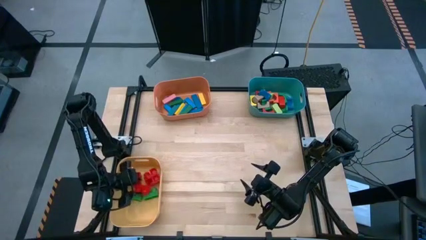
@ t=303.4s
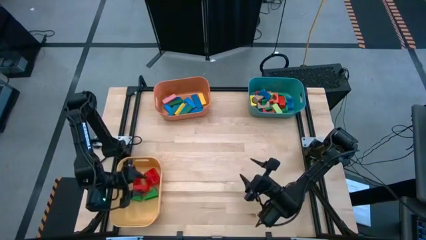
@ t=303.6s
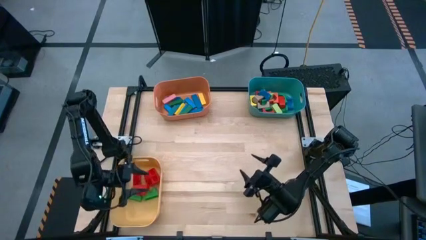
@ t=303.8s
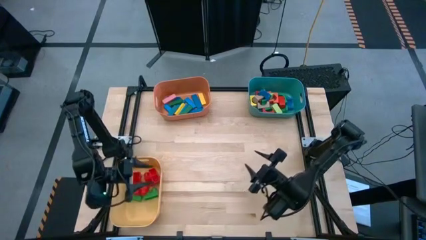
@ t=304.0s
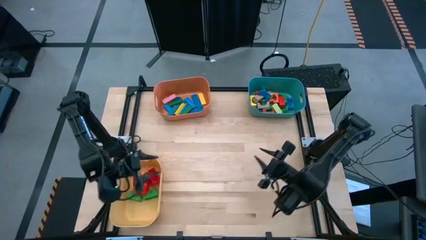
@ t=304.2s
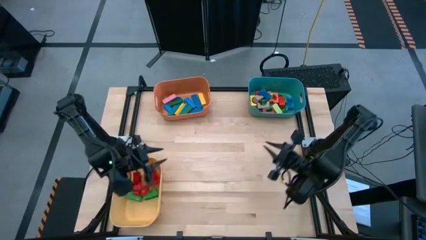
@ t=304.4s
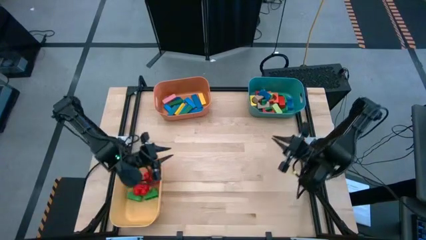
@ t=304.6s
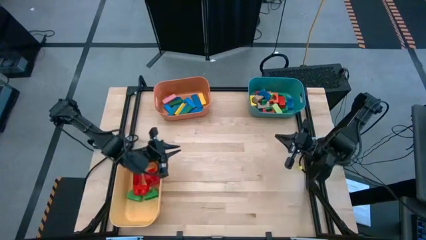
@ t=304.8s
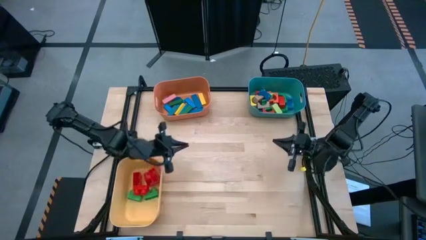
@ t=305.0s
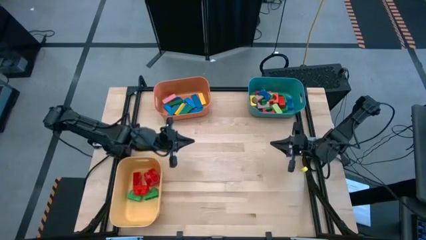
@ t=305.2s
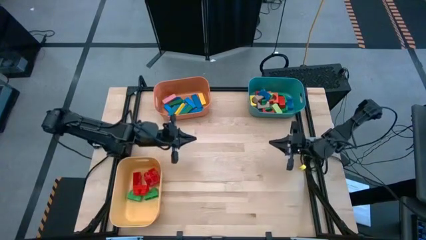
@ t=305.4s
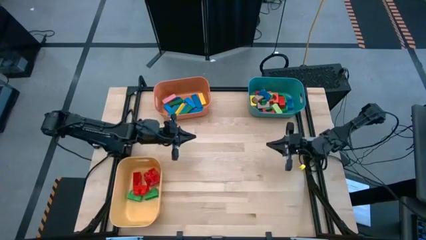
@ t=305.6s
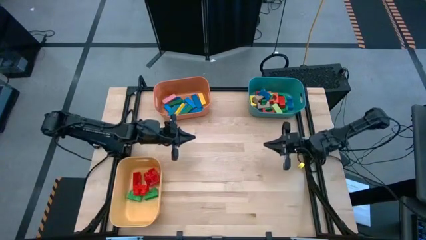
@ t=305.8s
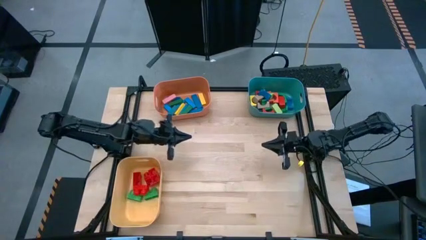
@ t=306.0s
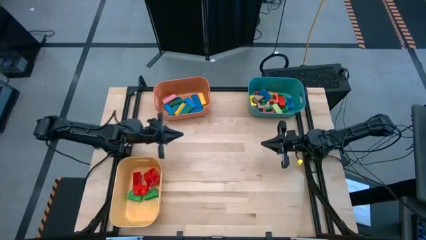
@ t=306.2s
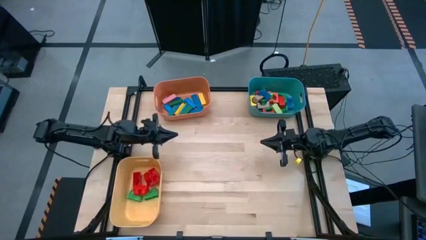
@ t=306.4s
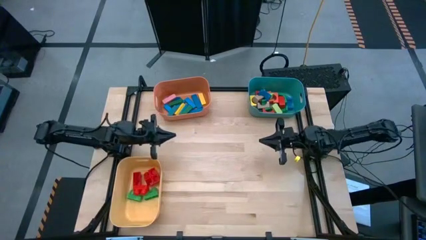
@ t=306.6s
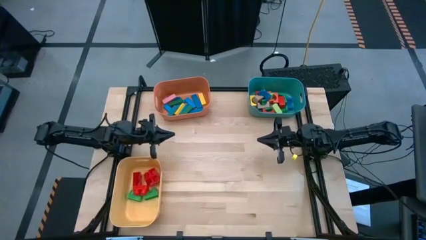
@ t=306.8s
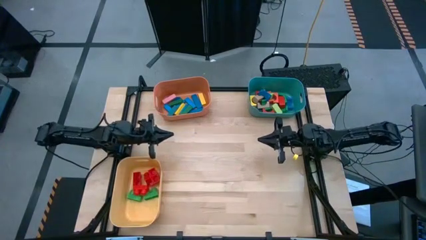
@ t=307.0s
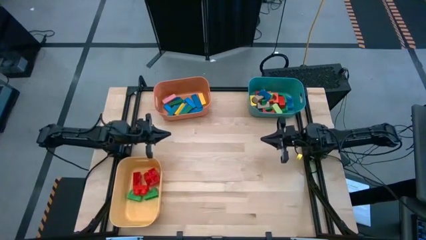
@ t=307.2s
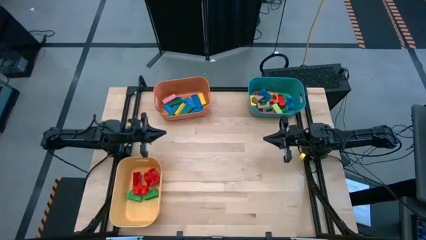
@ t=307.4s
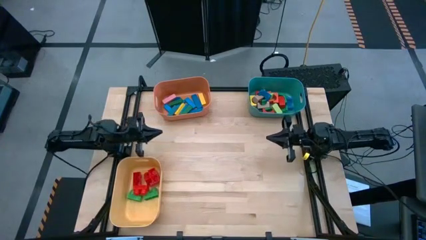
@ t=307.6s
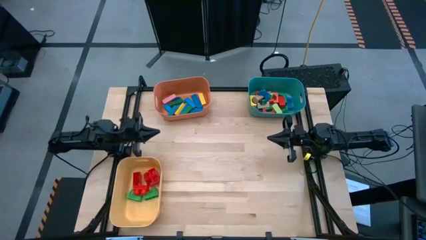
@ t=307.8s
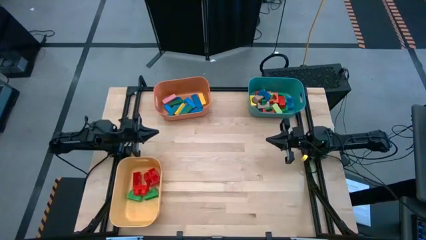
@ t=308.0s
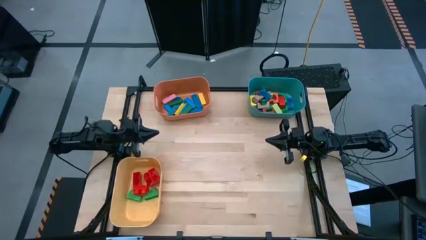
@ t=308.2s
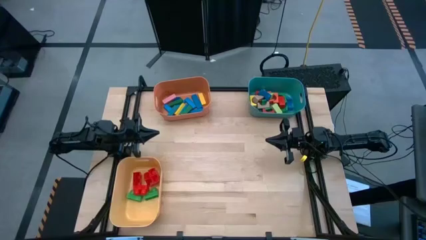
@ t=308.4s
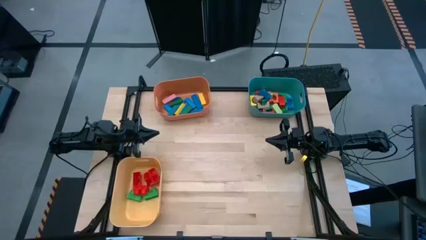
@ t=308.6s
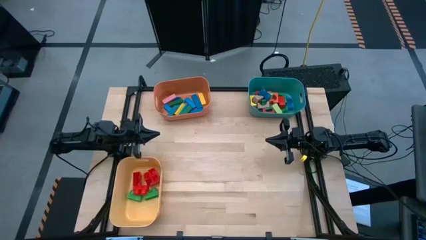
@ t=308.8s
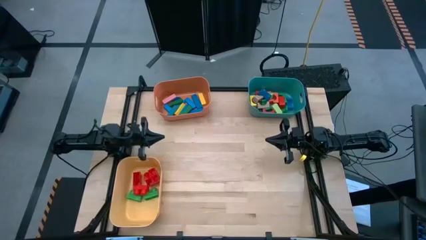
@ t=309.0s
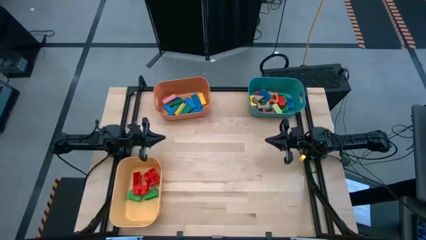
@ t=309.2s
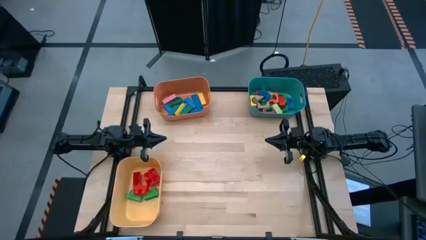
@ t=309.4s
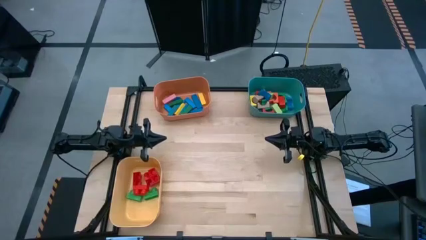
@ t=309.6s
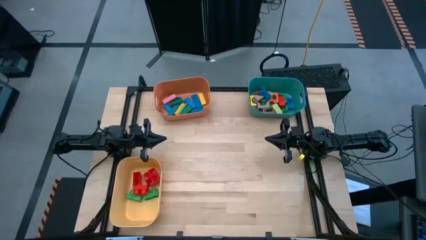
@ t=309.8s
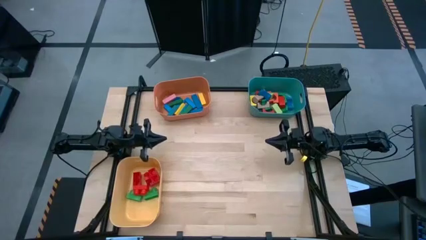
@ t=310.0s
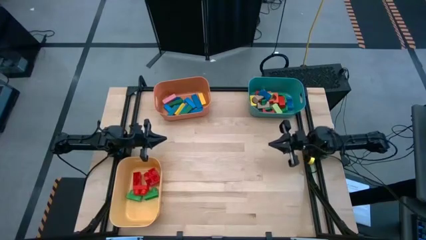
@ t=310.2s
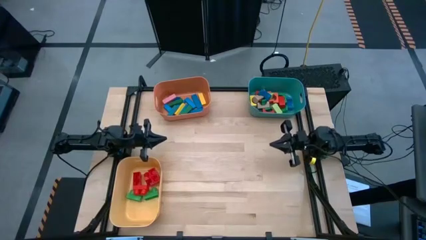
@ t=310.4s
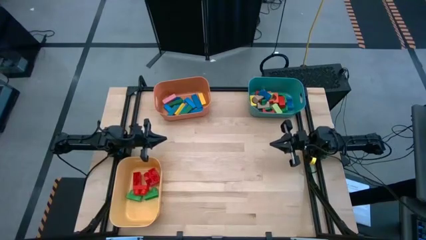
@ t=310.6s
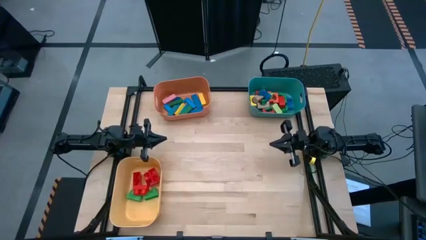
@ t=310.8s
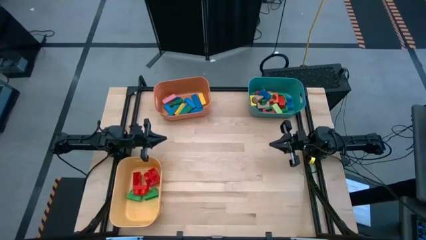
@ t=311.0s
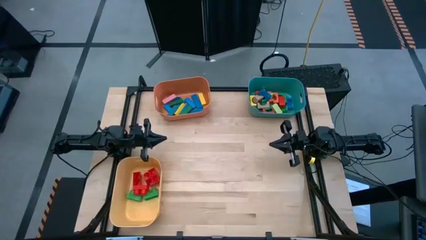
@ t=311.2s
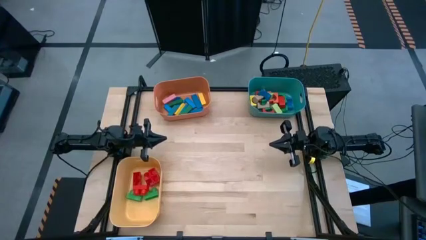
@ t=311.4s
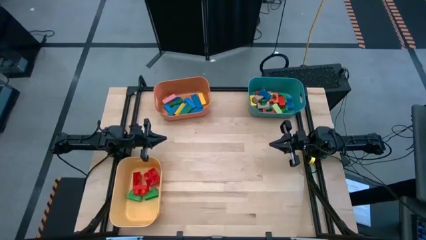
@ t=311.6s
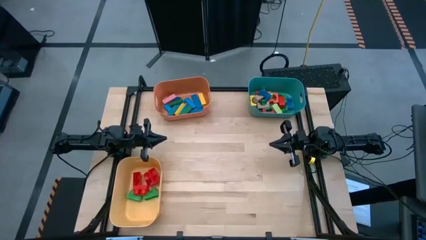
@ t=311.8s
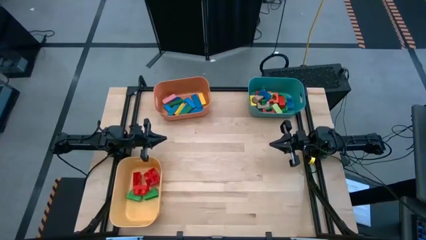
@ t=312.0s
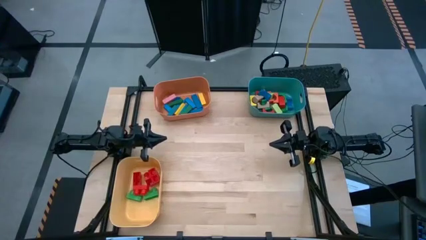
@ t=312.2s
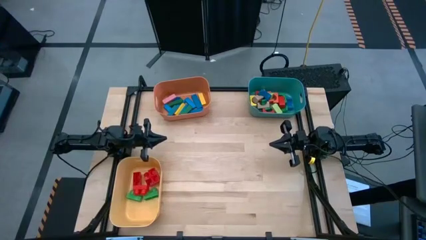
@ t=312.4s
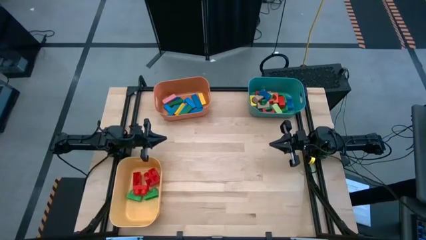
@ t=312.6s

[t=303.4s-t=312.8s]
Task: Sort blocks by size
Return to Home Position

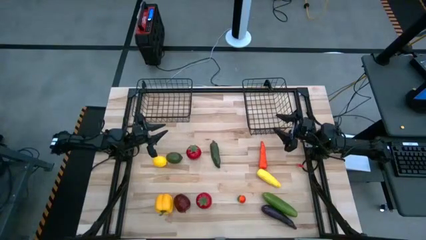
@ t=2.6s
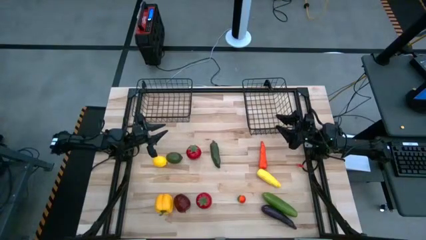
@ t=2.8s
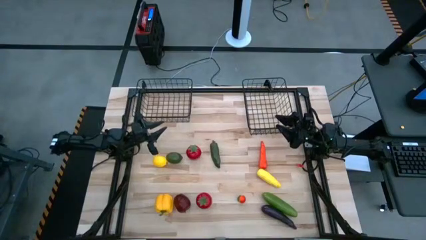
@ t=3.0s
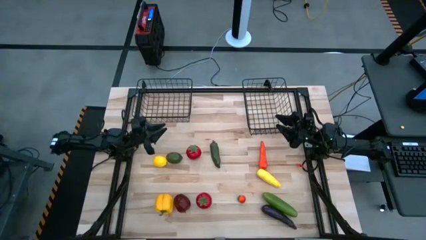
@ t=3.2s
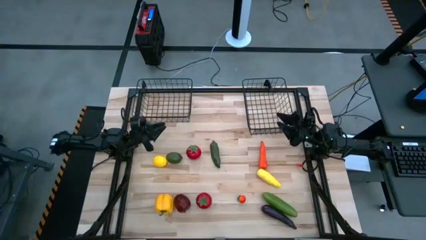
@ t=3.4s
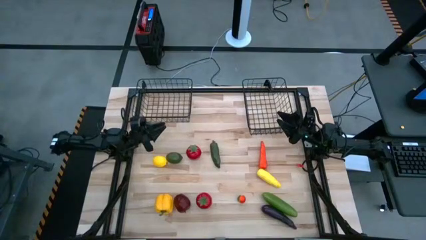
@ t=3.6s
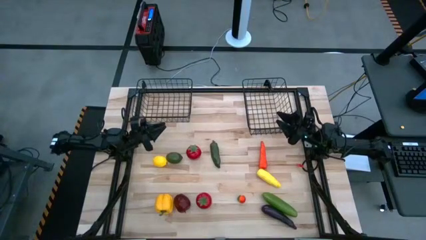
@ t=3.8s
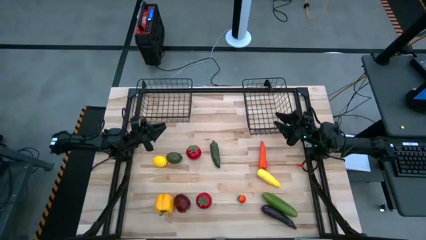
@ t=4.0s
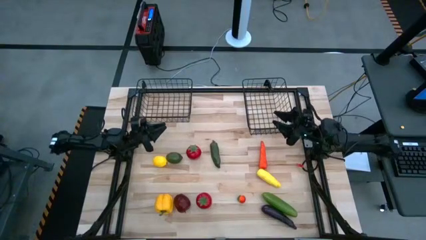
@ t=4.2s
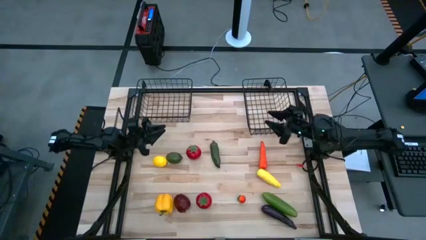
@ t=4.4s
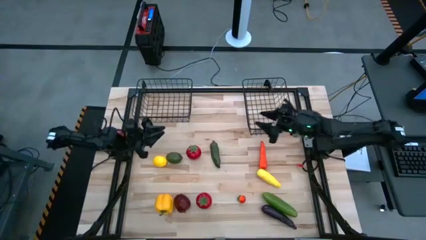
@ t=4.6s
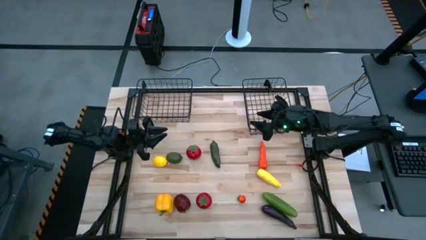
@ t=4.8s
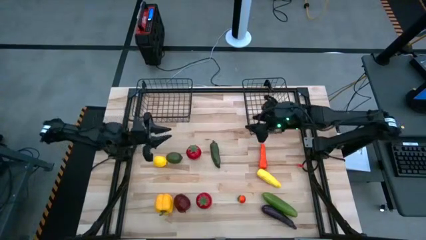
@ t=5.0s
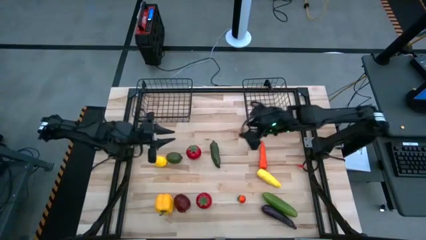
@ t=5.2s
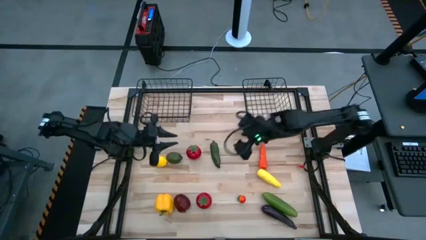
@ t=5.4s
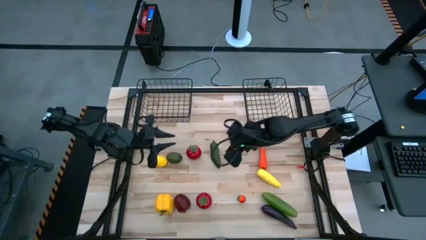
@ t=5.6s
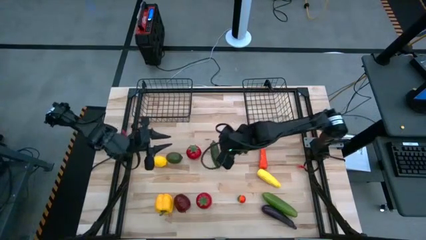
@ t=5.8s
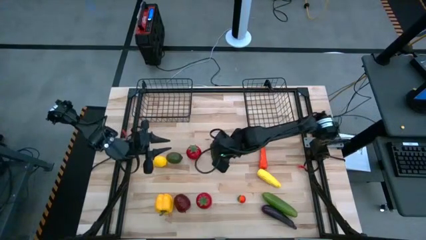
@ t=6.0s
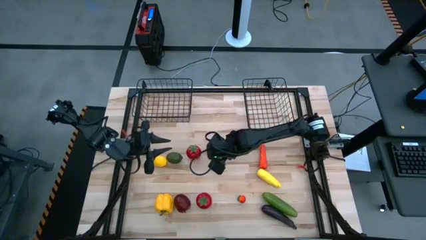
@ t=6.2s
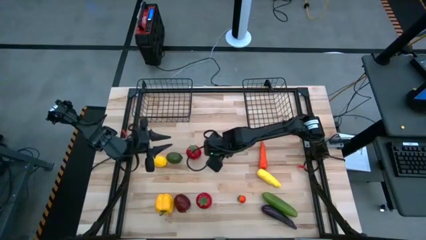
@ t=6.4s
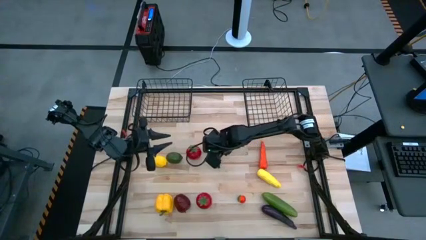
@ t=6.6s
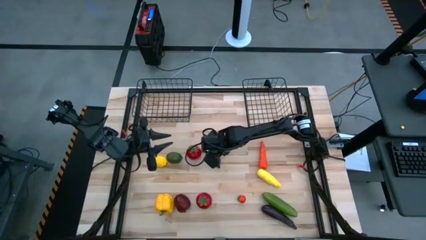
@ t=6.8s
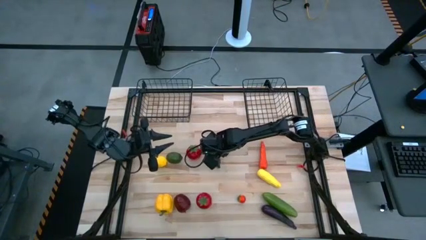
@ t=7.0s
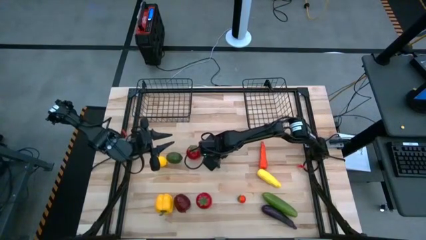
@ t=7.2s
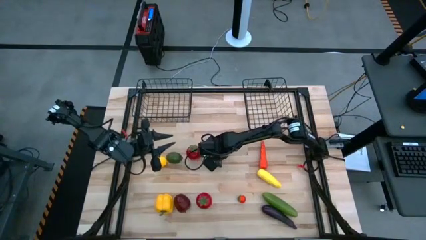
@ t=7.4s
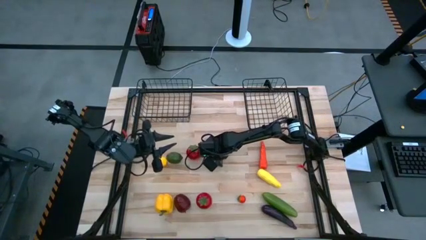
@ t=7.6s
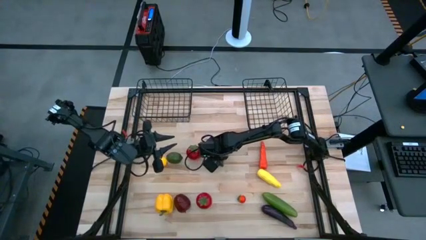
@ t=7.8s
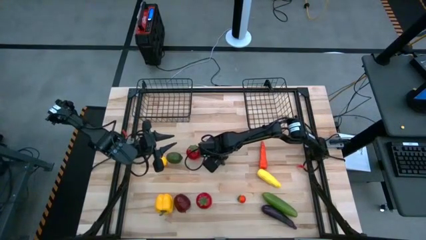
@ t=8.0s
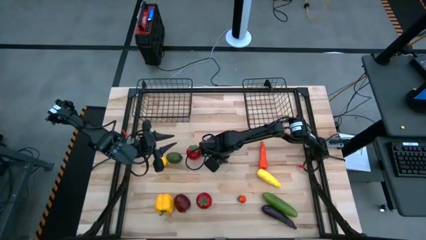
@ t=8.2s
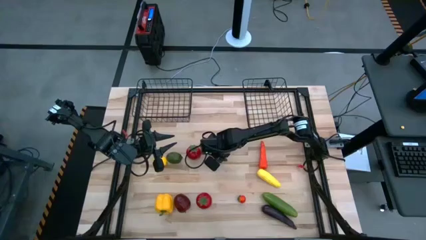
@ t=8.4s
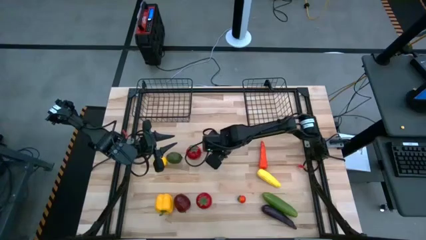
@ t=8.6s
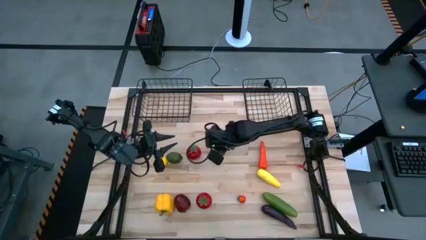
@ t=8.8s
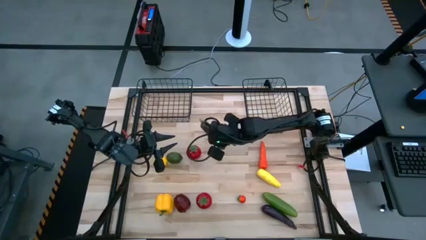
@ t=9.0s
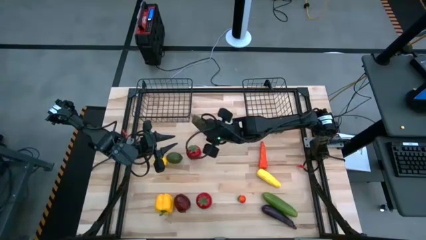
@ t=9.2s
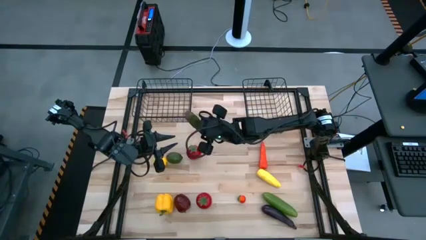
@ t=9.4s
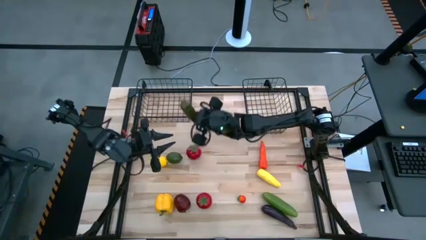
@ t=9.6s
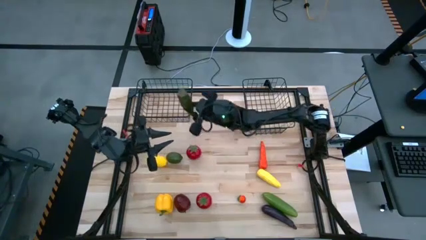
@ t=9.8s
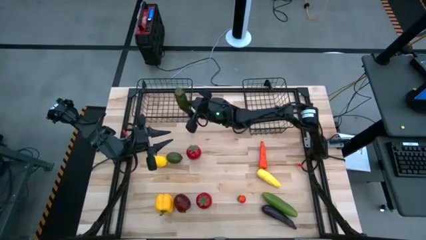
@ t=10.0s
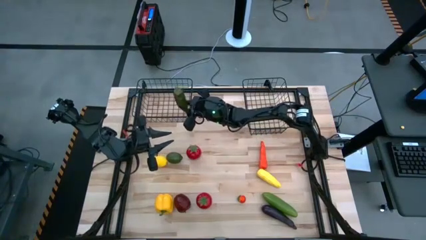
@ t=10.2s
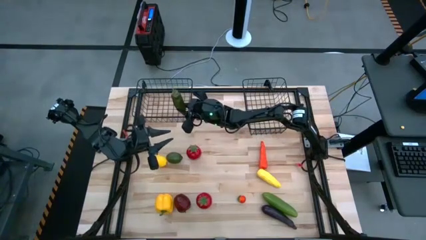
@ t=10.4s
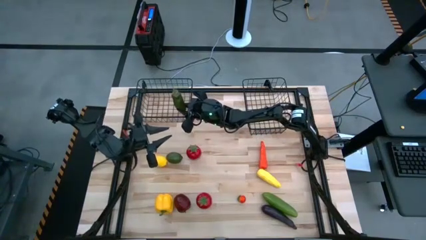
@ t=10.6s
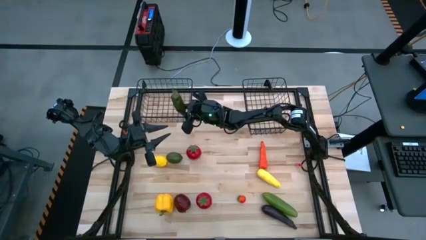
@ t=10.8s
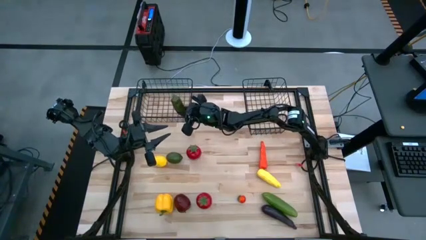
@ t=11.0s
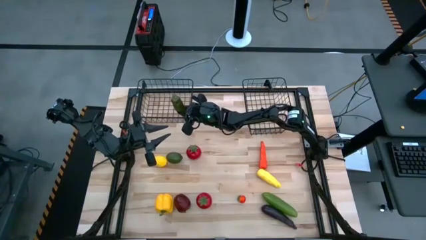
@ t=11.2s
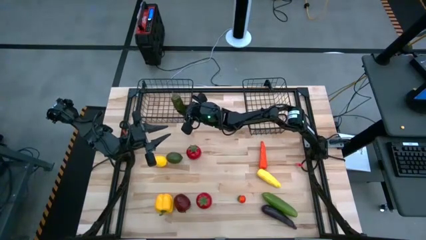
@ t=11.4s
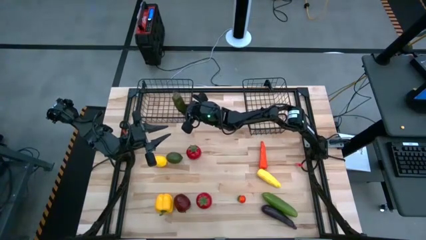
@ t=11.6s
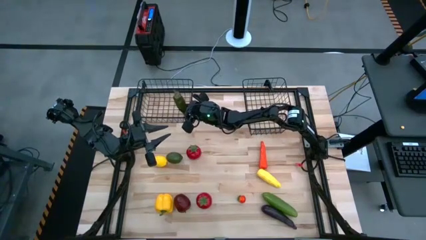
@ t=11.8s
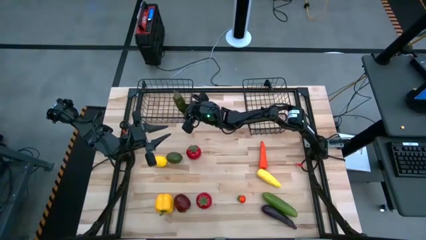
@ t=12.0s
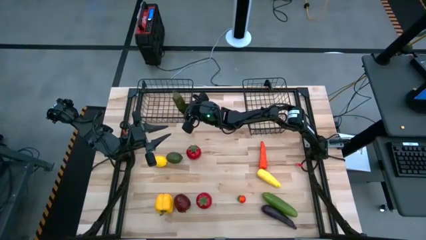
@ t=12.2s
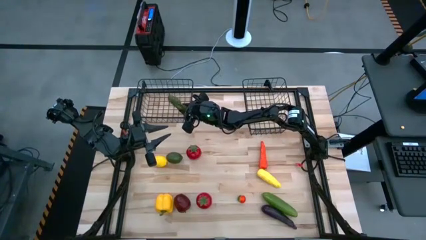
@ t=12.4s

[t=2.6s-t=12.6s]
Task: Sort produce into baskets
Put the green chili pepper into the left black wire basket
